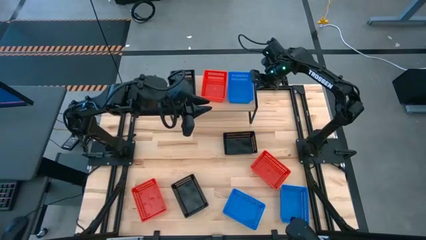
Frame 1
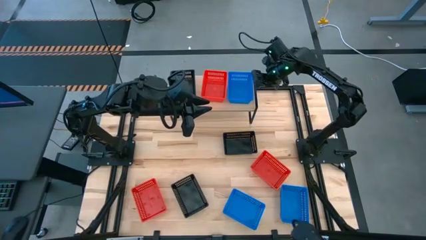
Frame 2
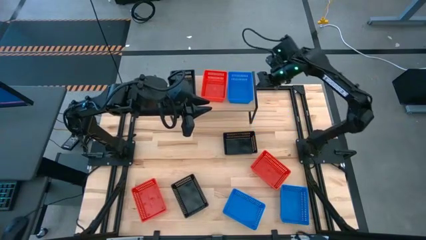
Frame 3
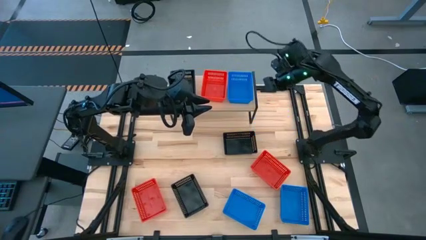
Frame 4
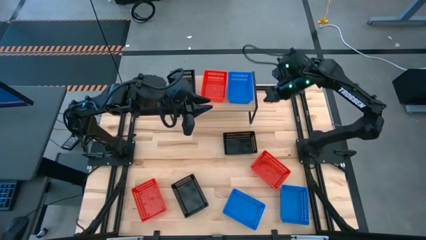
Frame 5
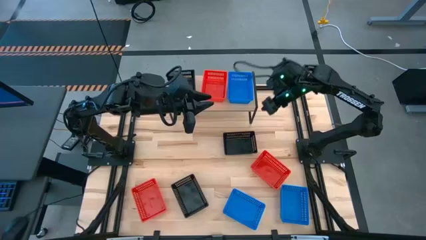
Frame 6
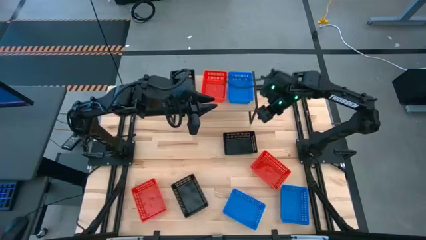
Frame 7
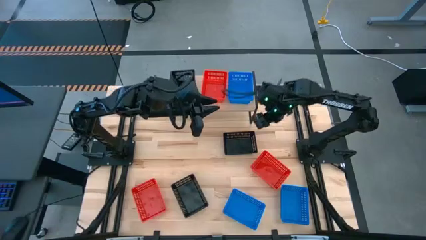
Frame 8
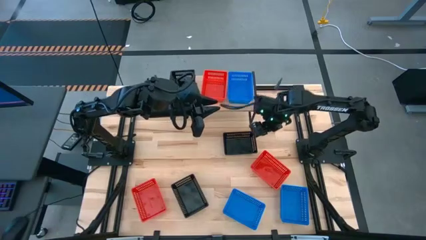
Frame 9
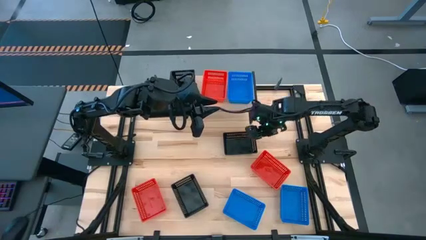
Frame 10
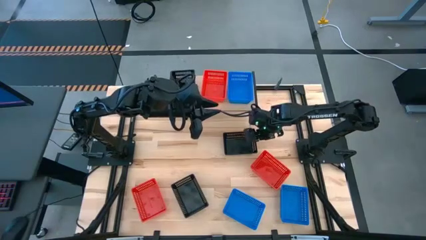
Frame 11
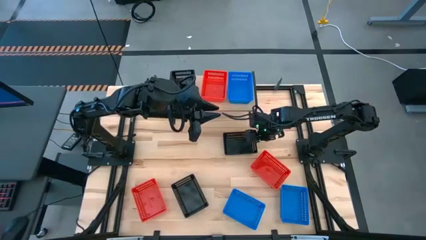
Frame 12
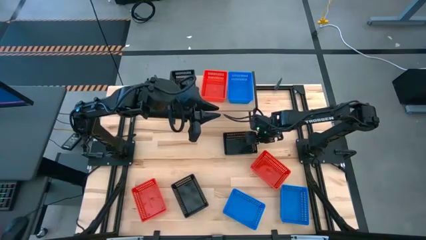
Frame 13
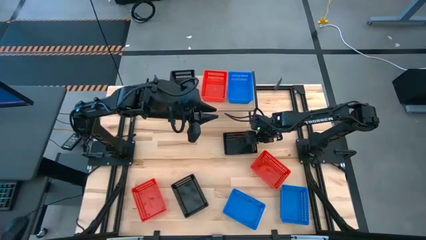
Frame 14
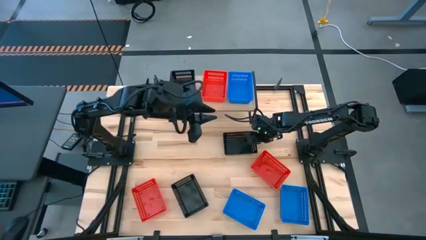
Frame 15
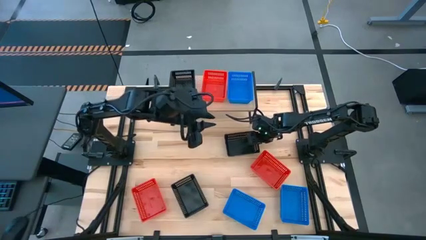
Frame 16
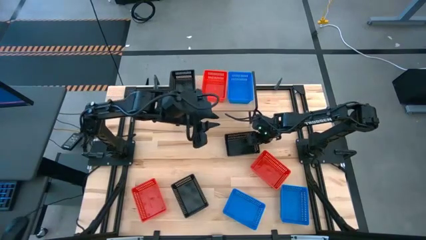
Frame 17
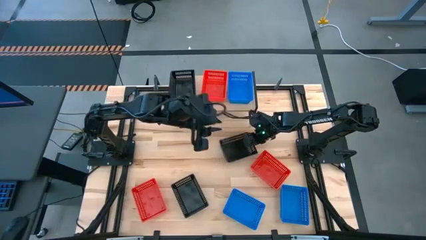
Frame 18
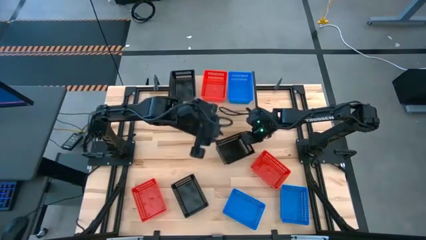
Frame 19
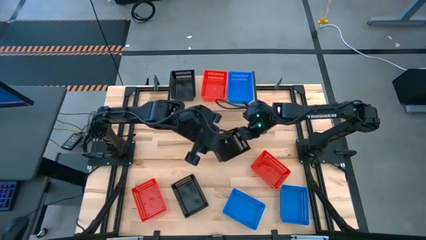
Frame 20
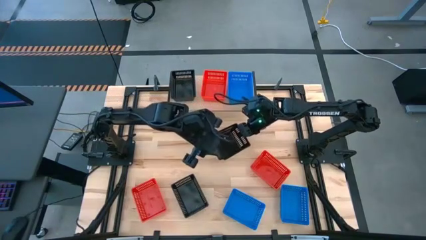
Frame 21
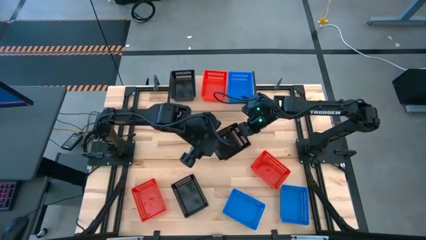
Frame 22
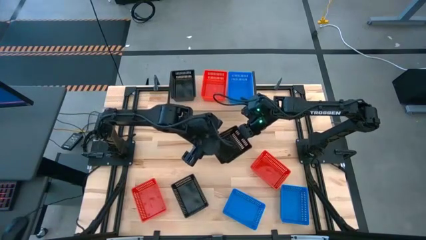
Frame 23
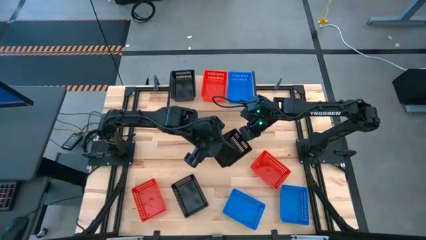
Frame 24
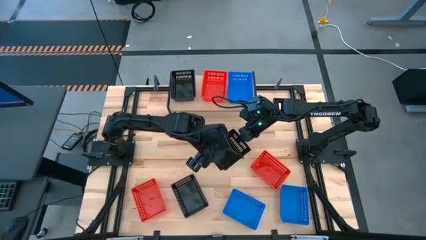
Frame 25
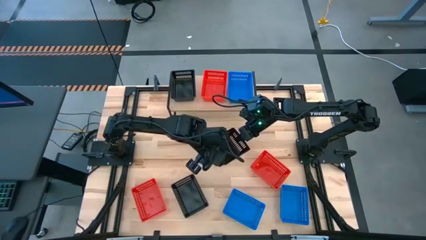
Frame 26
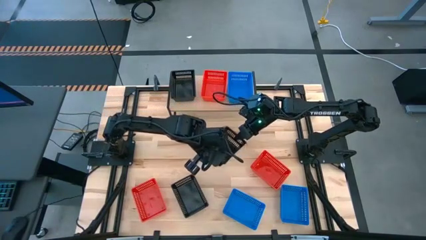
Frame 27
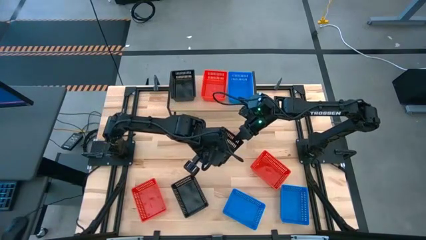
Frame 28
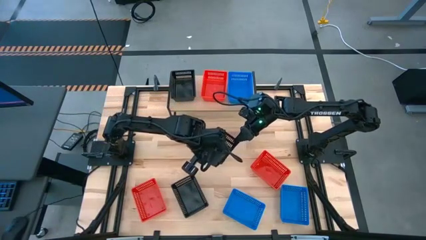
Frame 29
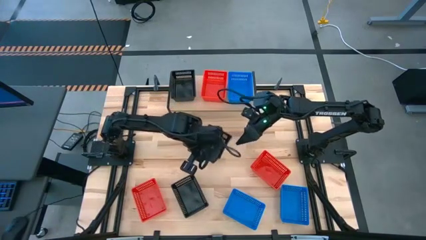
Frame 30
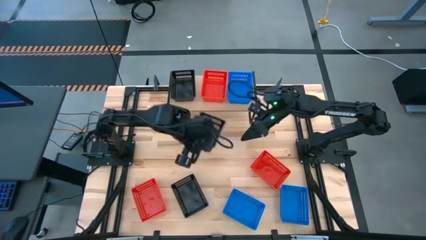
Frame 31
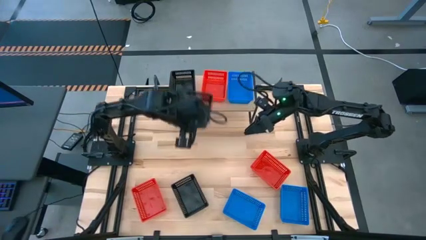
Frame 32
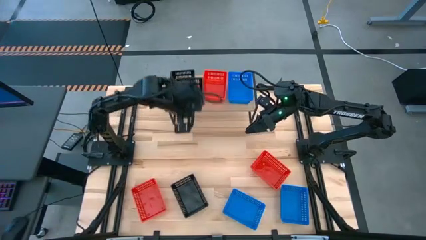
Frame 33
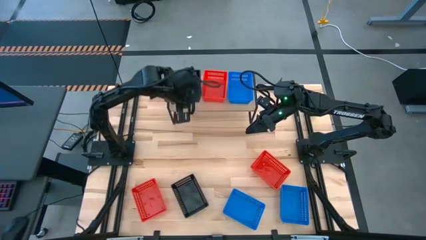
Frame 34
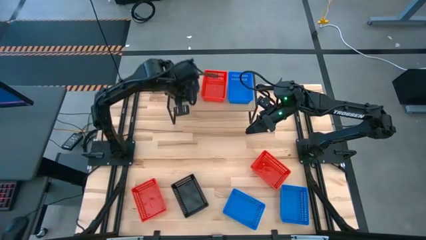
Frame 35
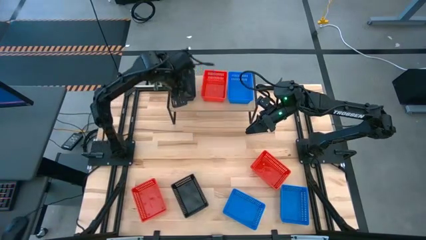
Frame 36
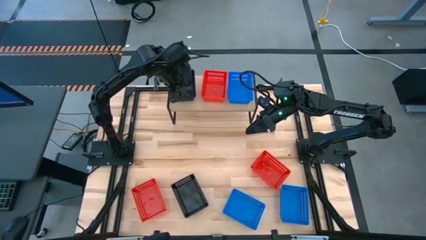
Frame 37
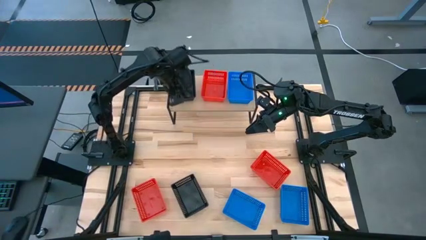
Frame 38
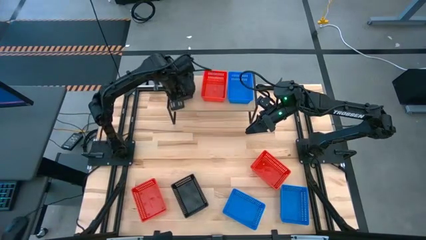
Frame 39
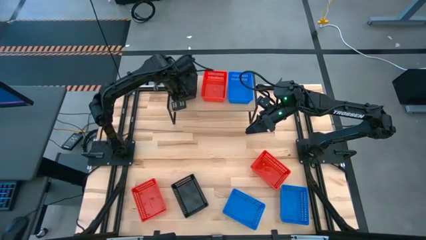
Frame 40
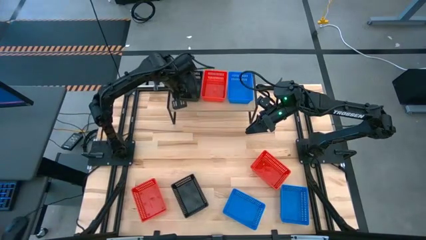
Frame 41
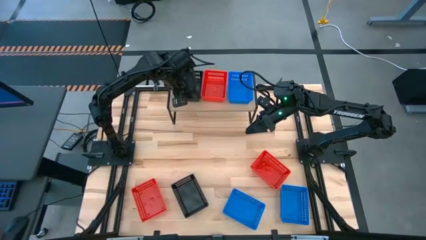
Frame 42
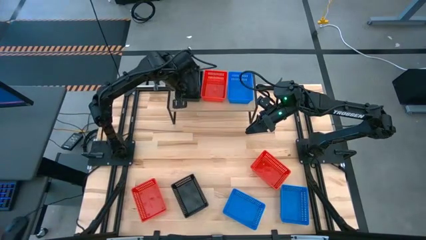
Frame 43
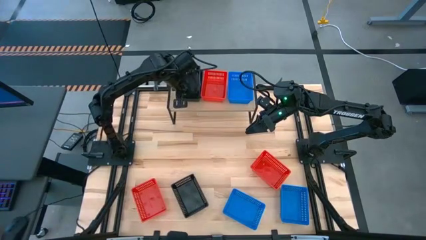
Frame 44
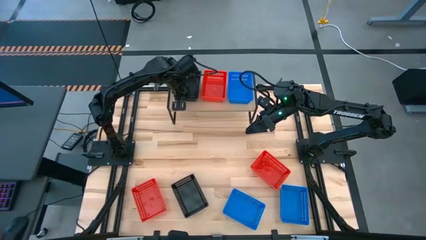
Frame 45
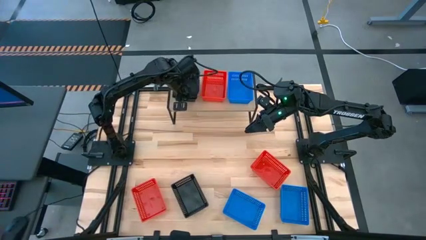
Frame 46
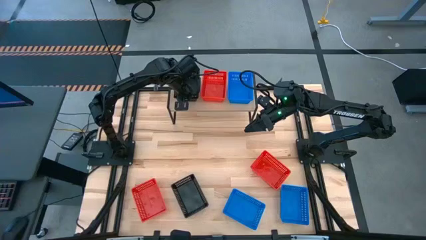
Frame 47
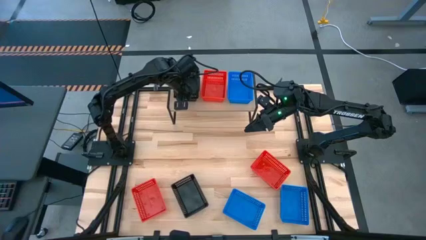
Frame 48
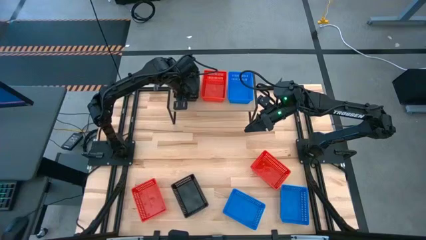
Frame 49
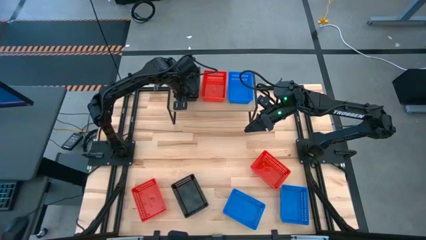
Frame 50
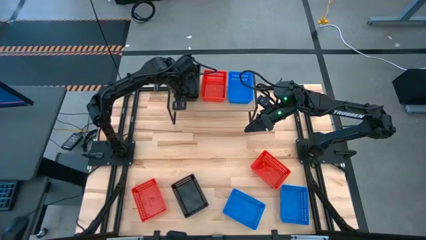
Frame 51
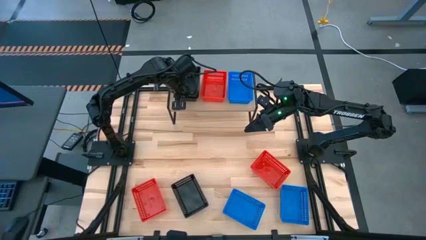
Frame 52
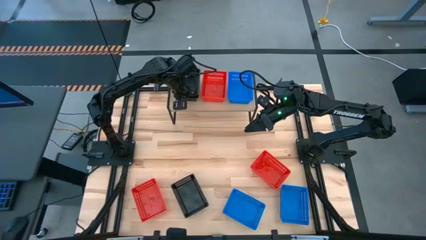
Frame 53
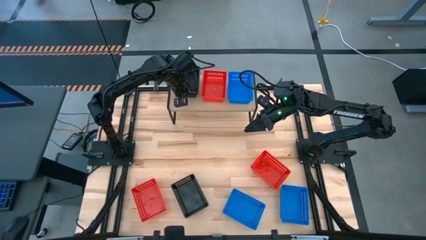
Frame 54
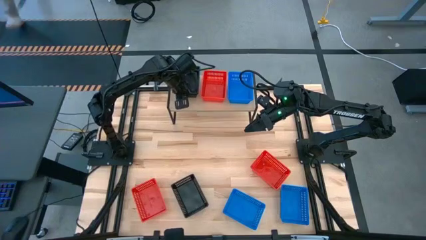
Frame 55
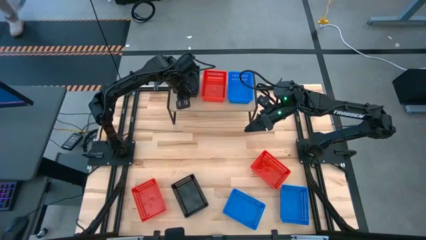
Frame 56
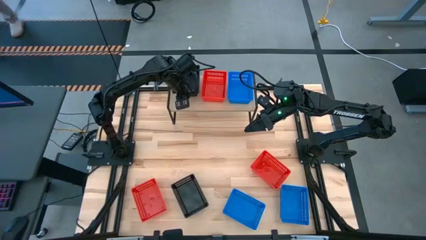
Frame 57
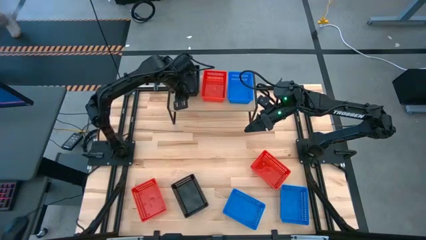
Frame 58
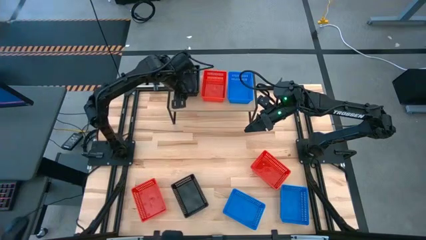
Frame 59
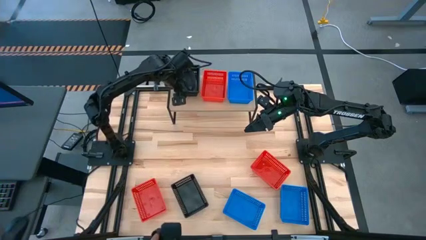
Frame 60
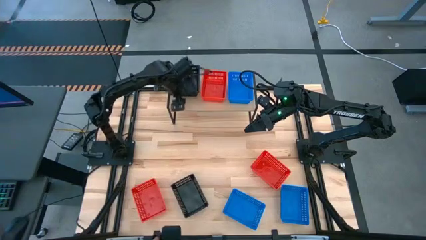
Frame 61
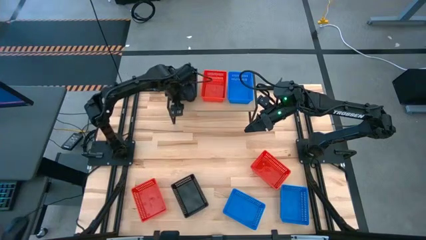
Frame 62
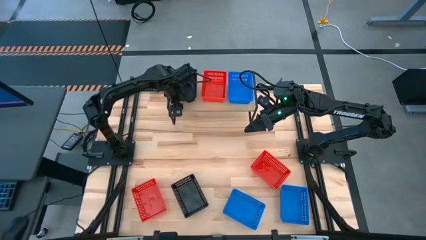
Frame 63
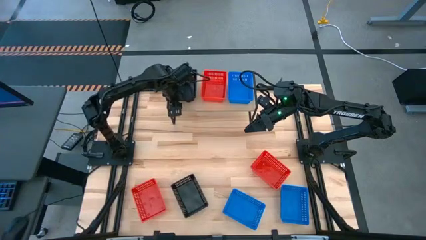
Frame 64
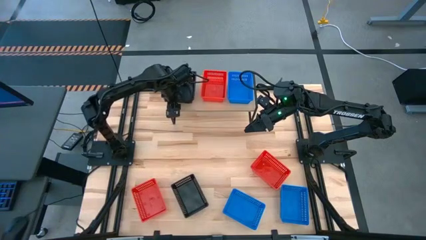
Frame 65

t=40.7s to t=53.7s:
Task: Stack baskets on shelf by color
Stack the top black bin on the black bin on the shelf

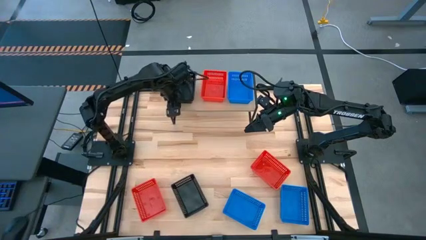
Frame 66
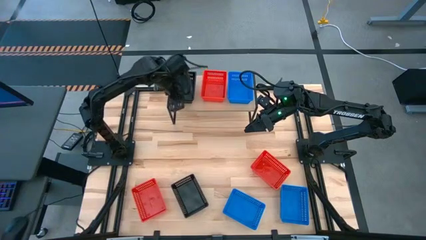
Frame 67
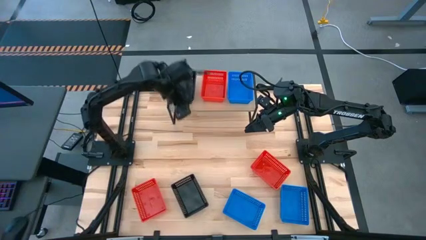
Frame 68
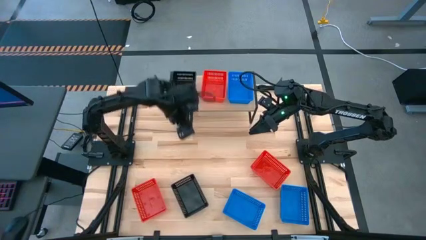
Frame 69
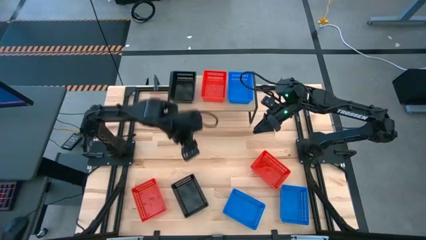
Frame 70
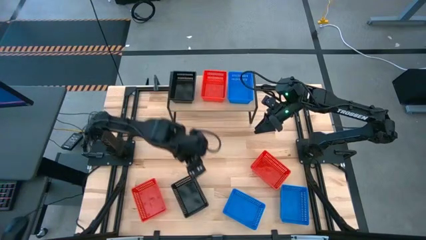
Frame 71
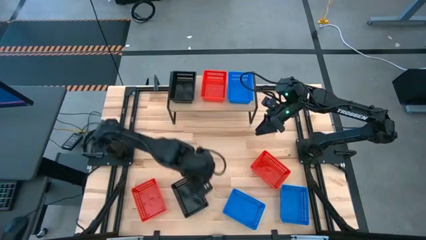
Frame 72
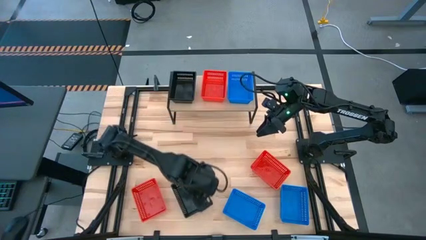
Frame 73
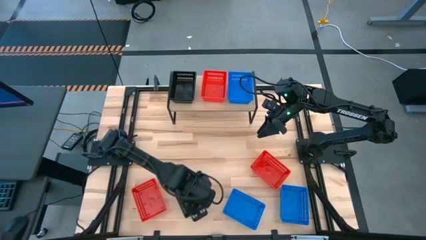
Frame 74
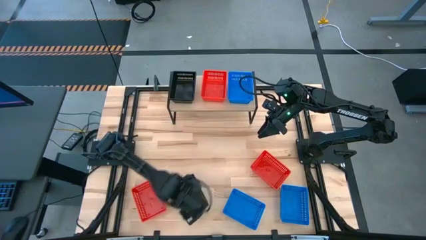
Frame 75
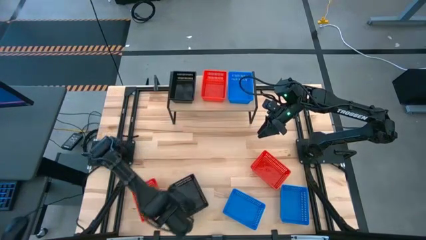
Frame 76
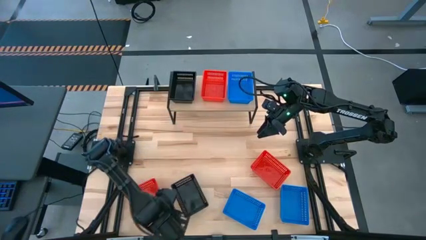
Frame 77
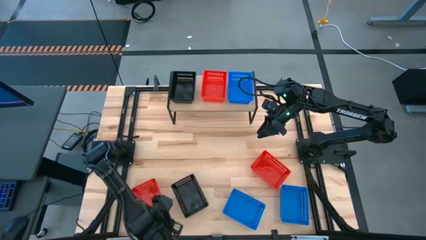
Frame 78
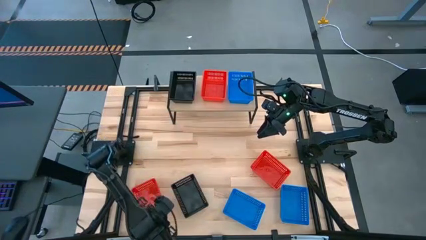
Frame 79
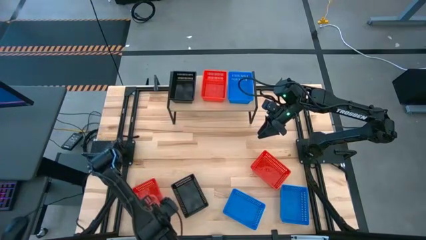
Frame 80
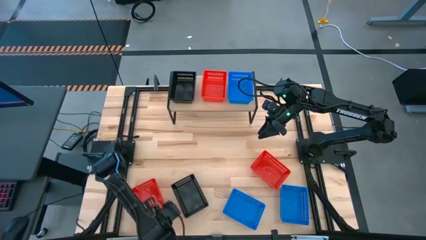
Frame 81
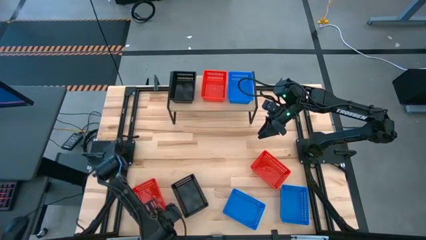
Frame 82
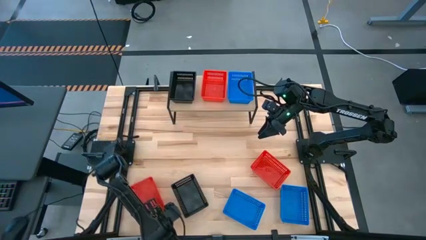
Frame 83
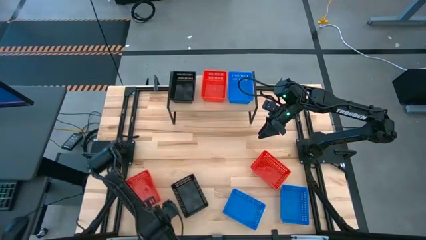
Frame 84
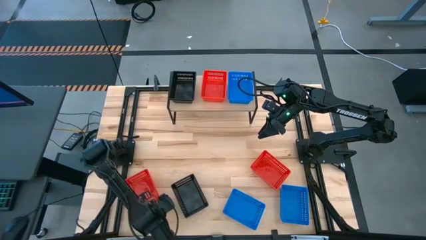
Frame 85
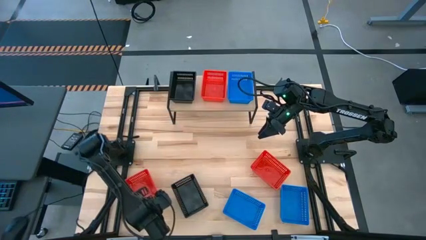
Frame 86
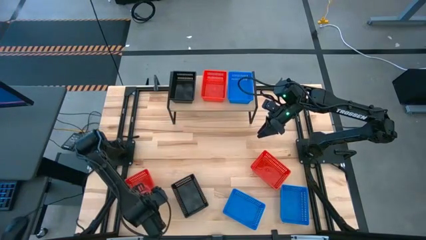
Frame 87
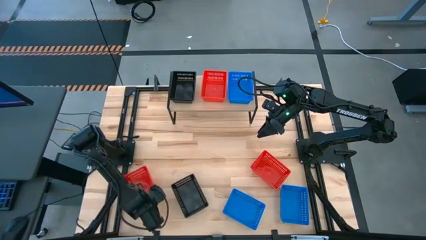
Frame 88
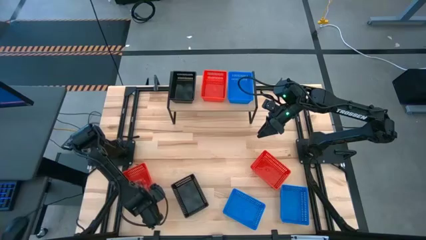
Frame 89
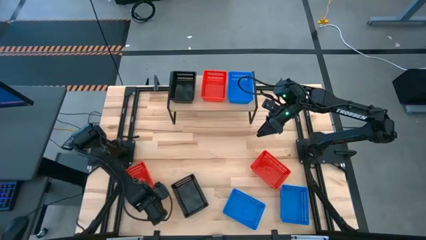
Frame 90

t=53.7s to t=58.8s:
Stack the left red bin on the red bin on the shelf
